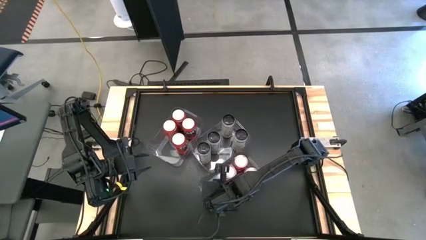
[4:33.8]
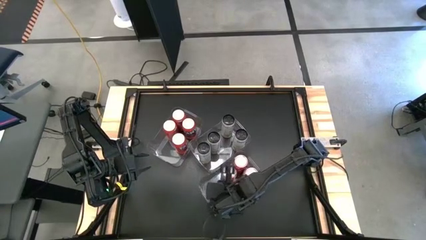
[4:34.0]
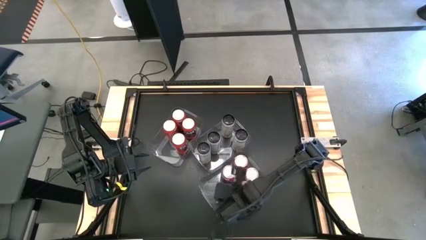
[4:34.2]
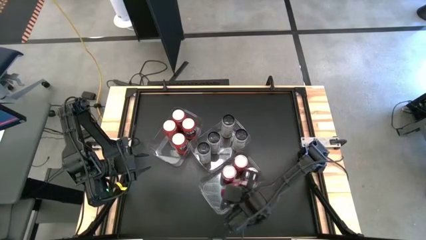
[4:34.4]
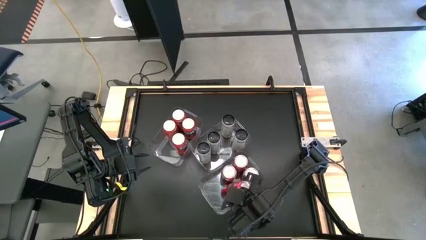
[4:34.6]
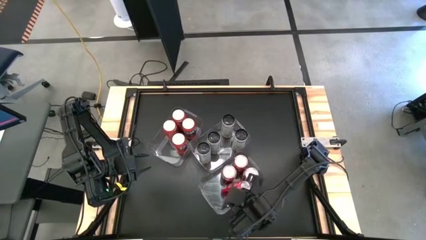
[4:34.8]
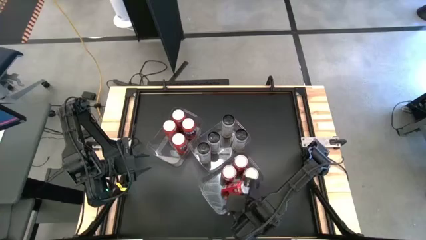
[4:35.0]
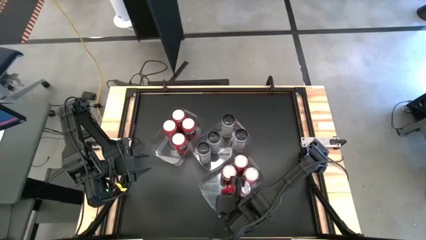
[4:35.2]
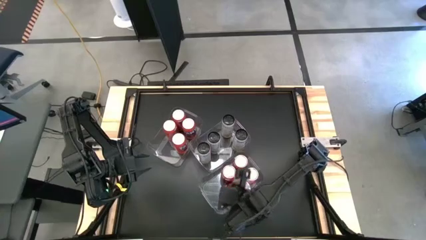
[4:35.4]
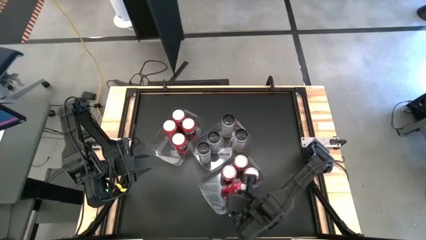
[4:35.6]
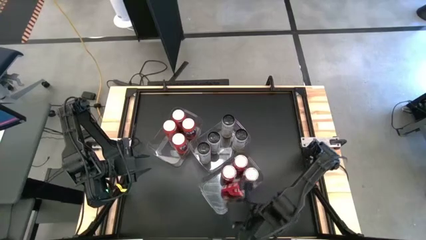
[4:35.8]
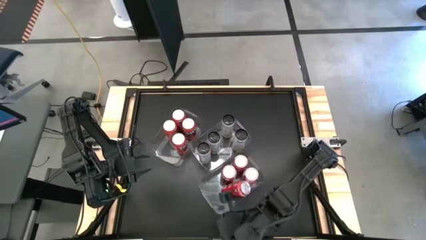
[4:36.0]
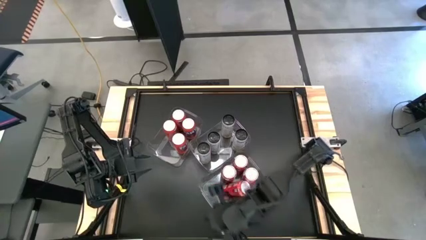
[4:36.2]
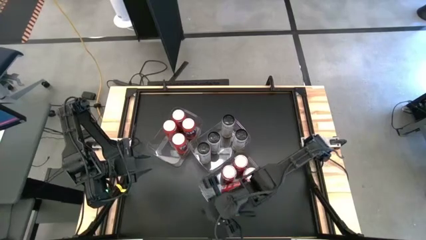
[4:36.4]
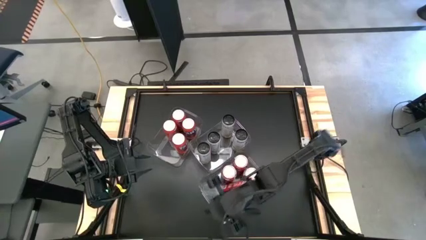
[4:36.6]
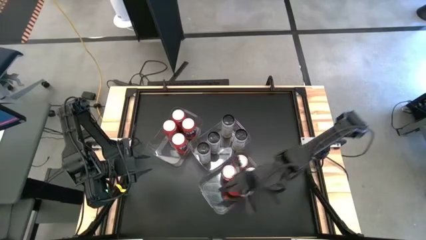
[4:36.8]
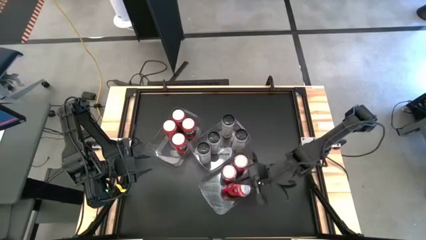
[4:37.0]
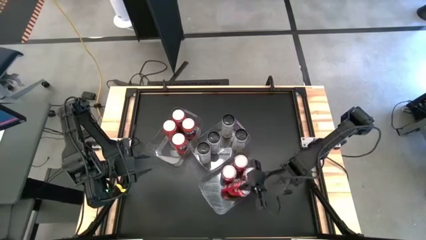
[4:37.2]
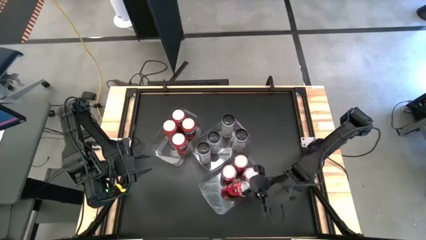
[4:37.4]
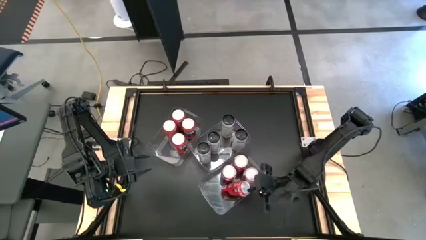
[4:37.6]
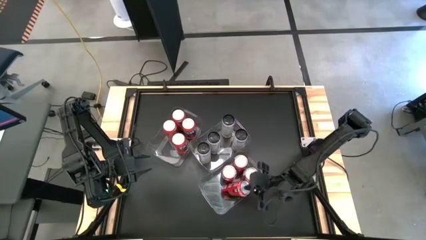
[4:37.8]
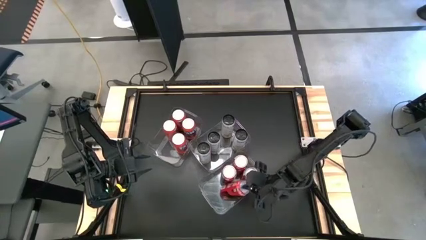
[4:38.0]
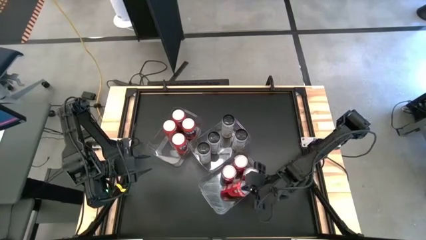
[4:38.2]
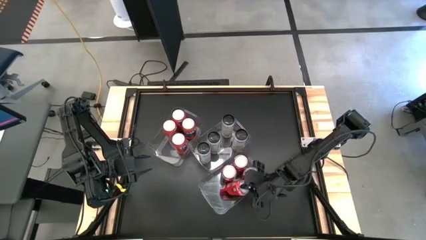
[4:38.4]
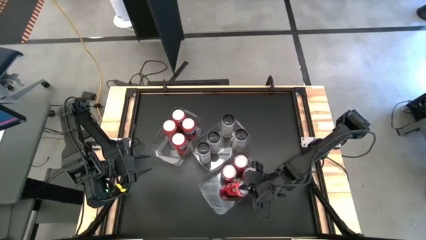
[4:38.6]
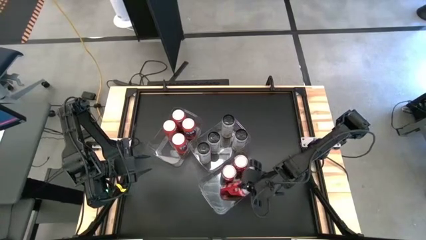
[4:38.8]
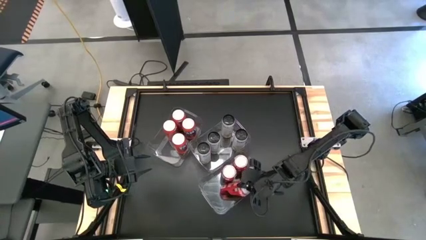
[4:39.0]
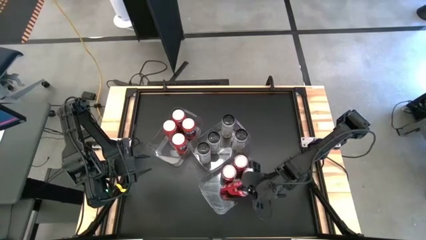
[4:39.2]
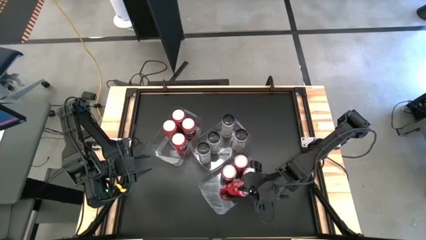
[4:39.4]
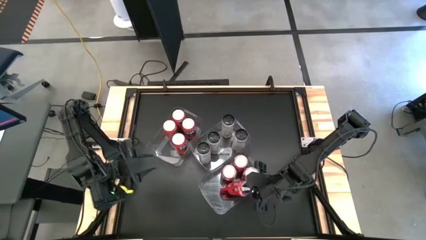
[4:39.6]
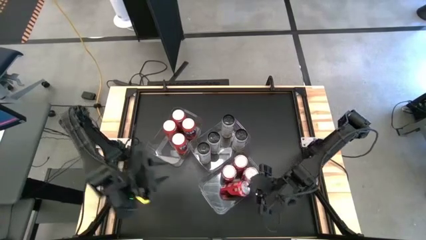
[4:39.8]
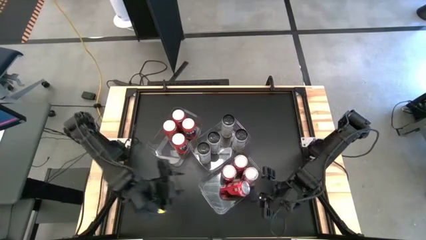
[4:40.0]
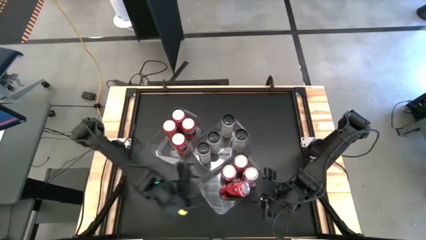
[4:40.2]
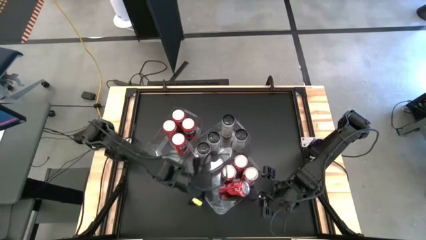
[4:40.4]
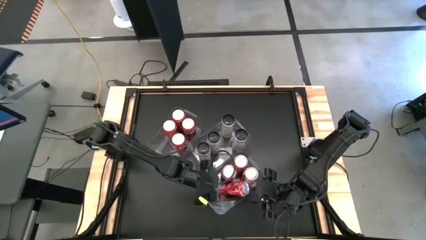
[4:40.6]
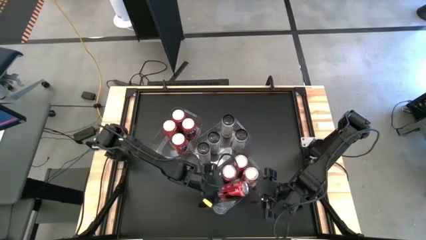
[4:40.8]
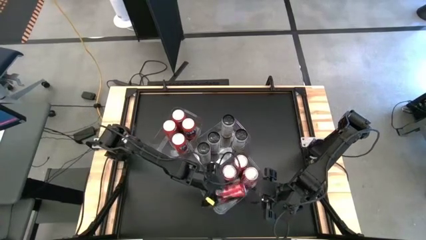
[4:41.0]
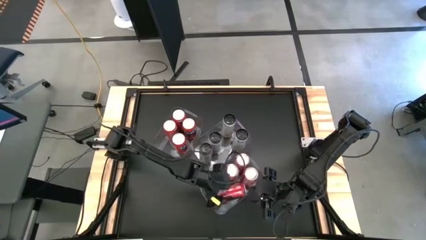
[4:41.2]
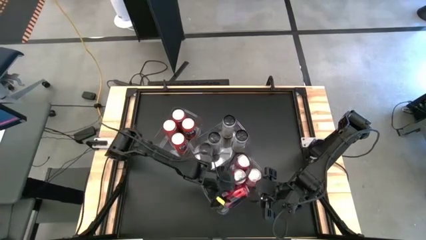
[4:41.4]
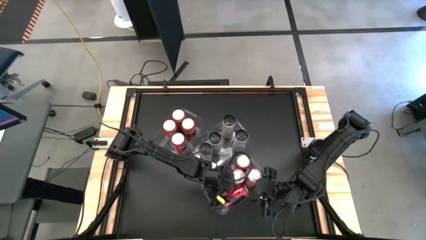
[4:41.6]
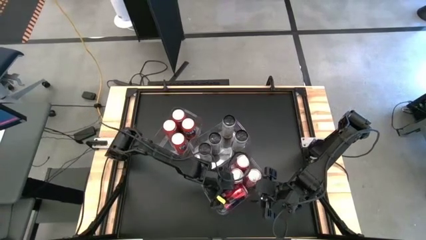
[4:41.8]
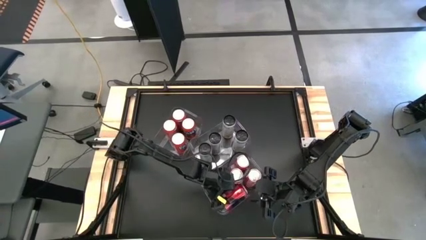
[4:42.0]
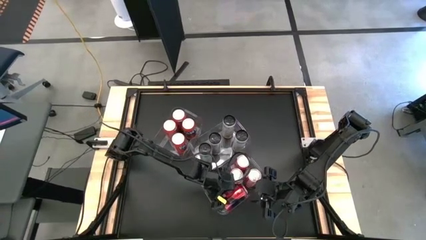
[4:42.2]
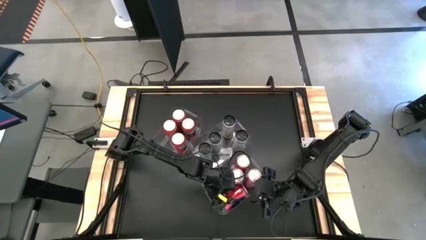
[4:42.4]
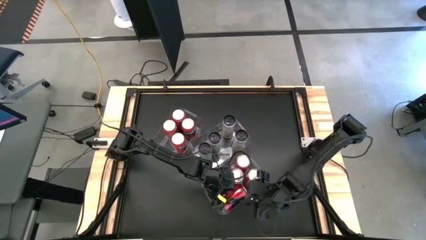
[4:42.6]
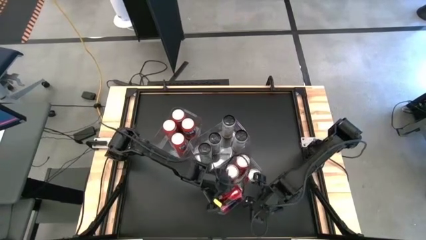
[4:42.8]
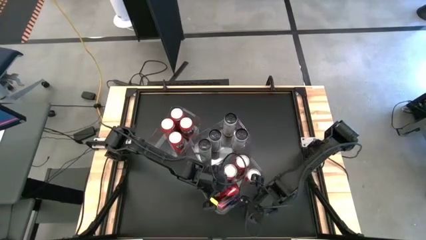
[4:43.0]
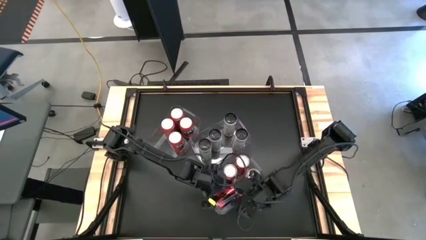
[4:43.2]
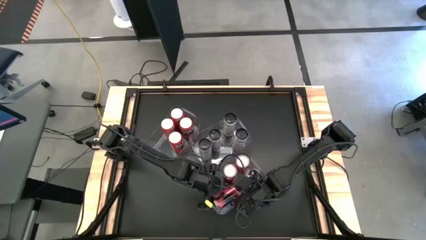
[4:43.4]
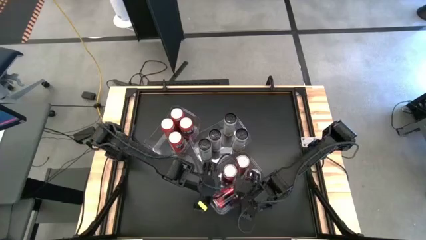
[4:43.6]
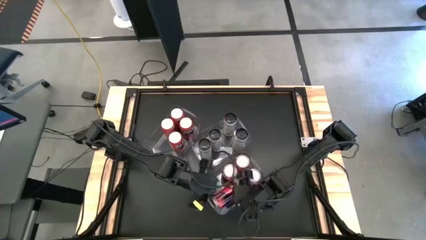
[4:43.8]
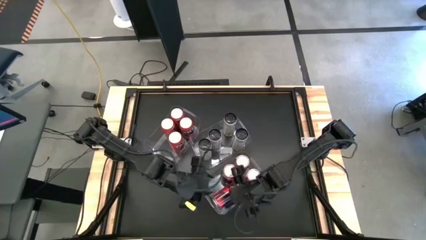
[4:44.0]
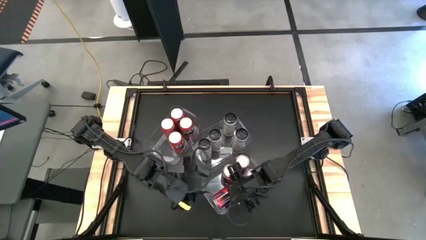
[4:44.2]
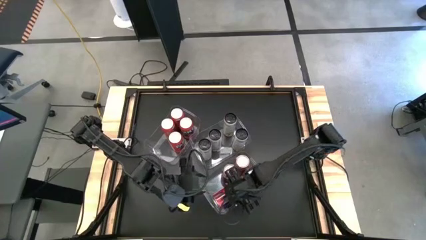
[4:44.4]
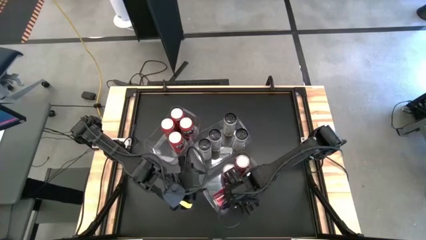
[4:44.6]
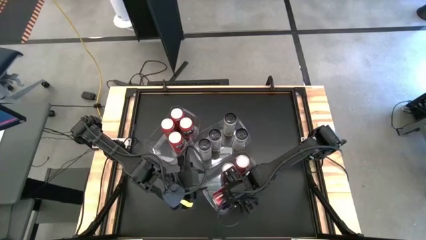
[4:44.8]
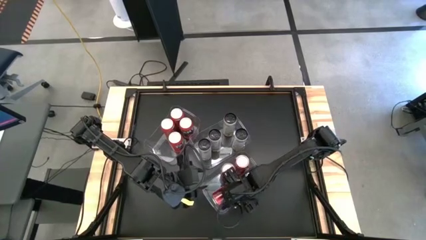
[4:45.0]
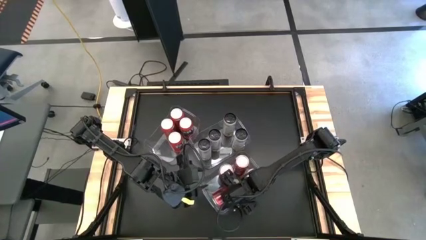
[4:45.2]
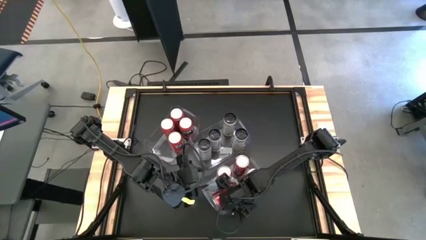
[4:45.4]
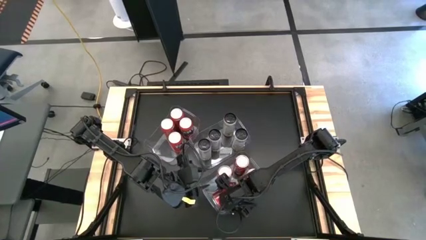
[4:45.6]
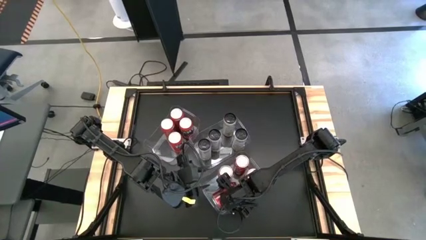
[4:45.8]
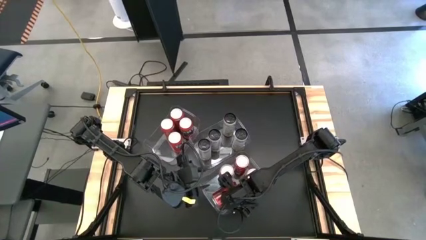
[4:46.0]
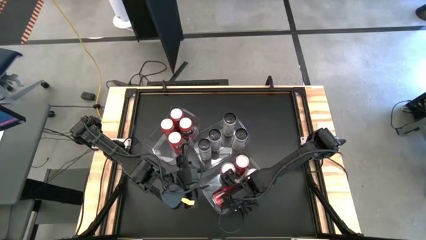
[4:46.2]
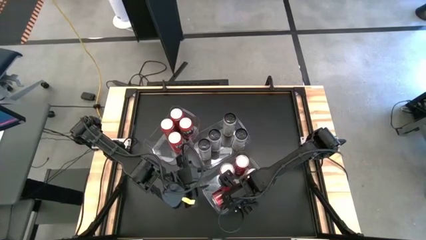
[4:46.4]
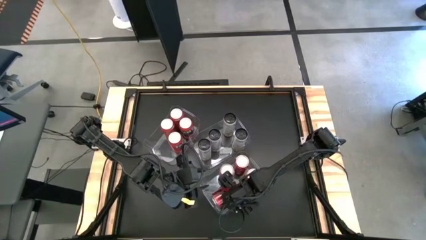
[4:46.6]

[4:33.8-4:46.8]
Task: Sort soda cans
Put the red soda can into the right transparent bin

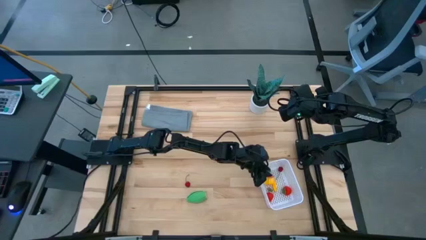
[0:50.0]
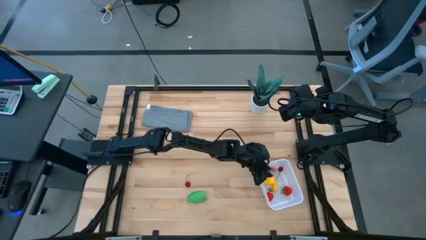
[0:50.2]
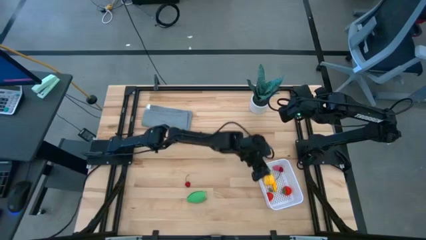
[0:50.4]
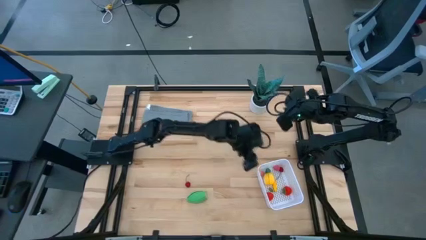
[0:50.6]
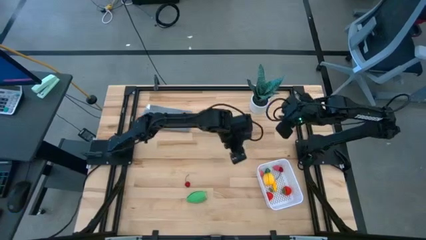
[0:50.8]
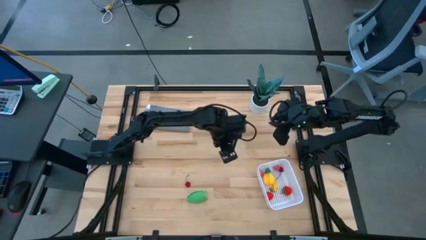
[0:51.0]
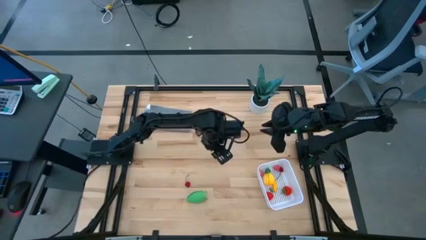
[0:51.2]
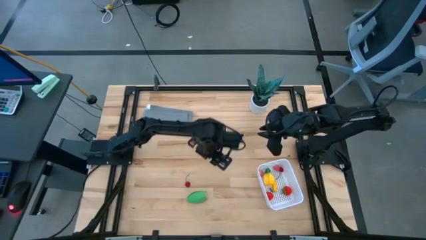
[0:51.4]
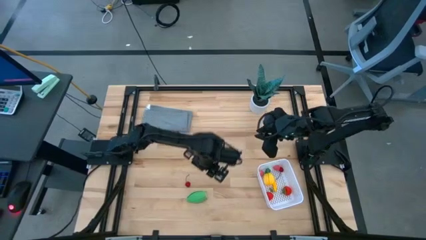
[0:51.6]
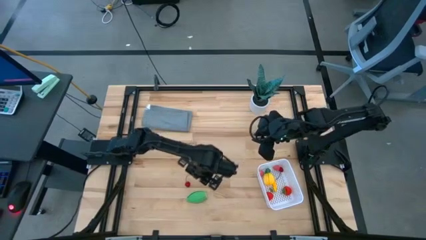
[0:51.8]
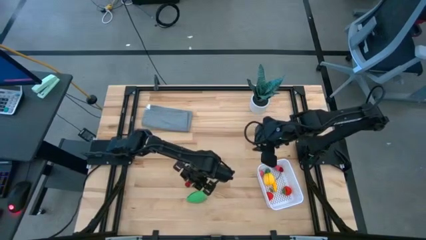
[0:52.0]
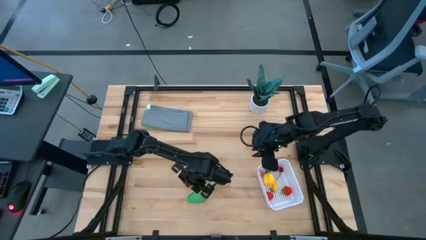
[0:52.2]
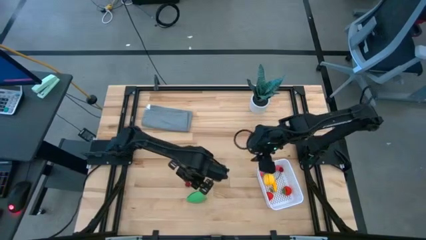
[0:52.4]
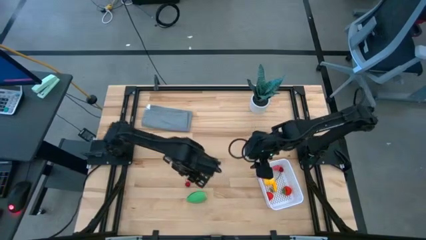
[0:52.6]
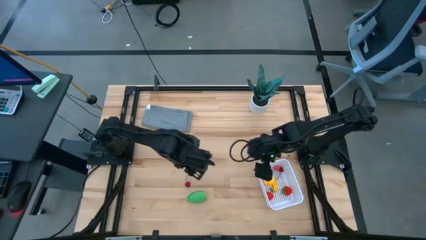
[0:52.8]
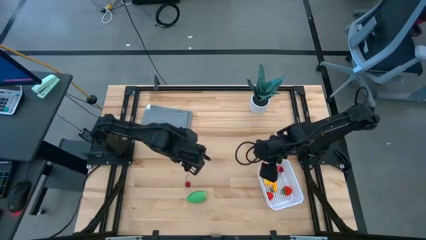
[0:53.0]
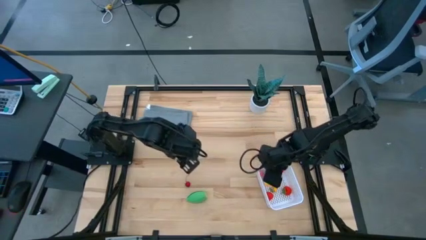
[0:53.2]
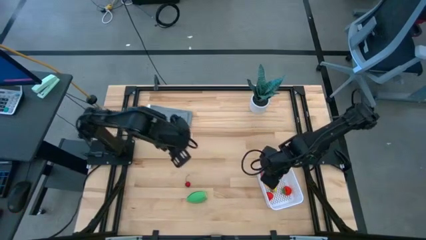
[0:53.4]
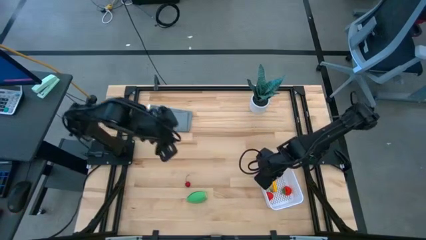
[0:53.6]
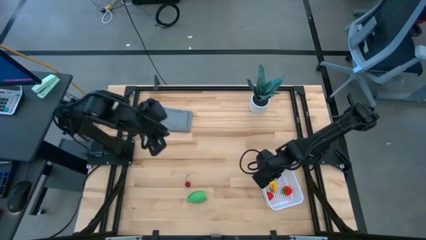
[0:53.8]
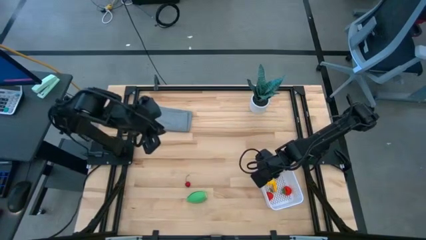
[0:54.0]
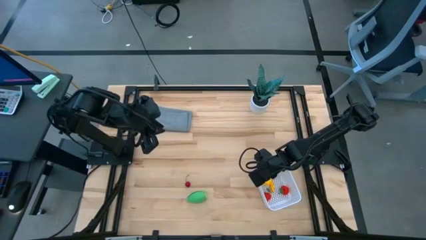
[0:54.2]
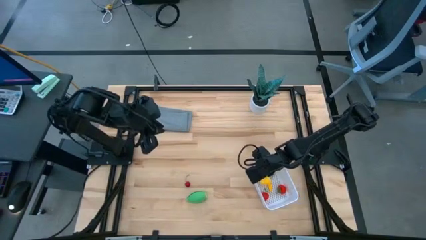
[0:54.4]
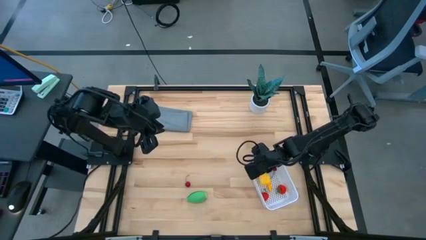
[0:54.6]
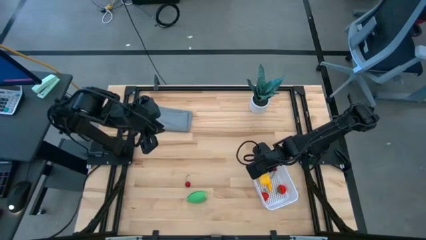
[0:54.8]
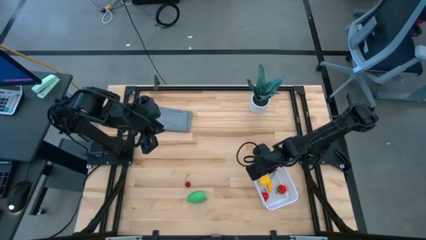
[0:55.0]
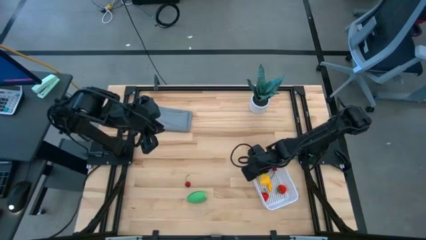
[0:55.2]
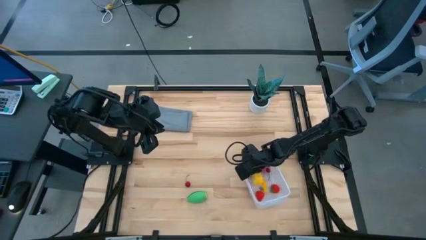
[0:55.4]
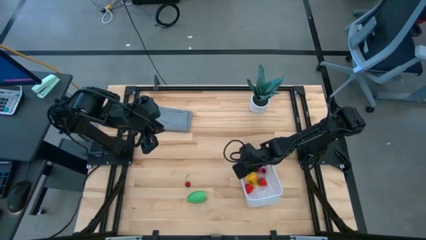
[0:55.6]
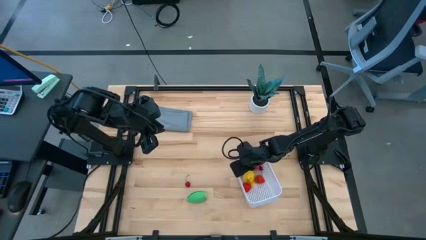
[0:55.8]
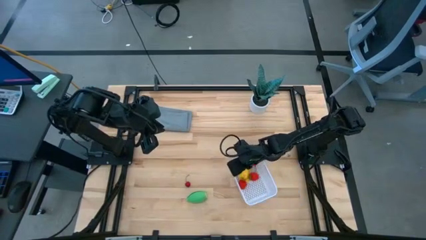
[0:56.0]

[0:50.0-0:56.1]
Task: Pick and placing Produce into tupperware
Move the white bin to the center of the table
